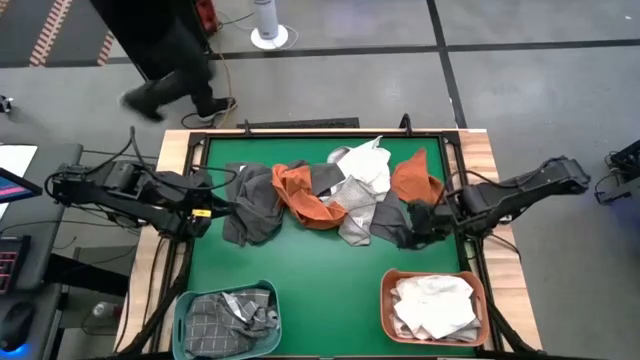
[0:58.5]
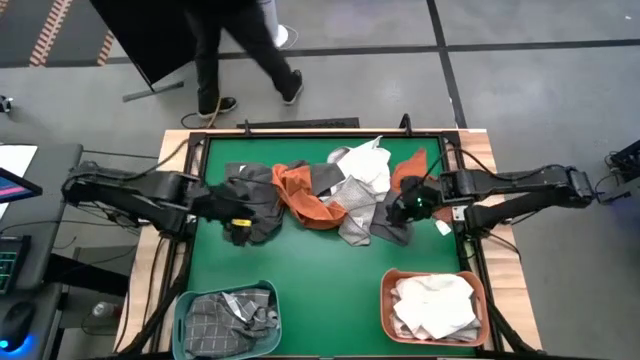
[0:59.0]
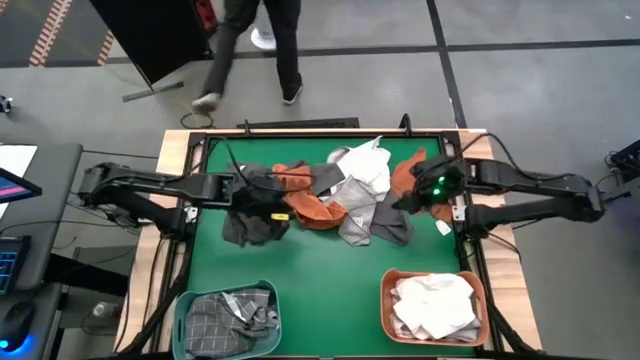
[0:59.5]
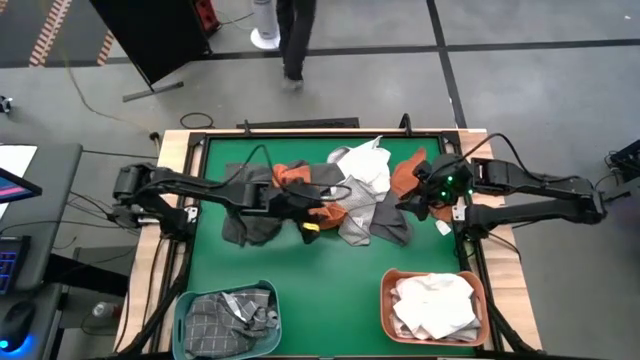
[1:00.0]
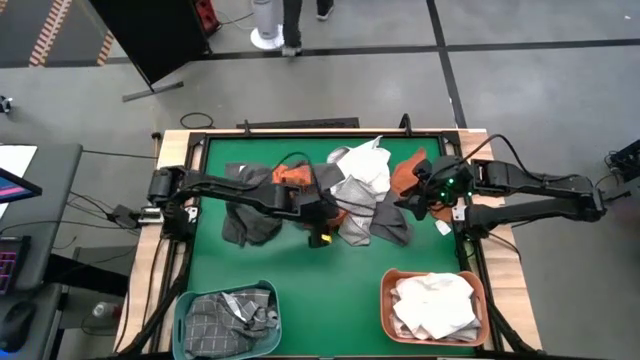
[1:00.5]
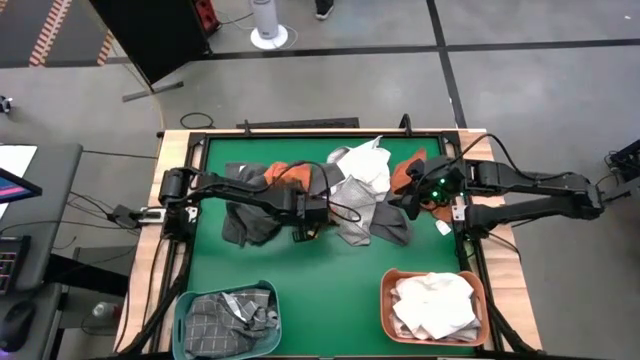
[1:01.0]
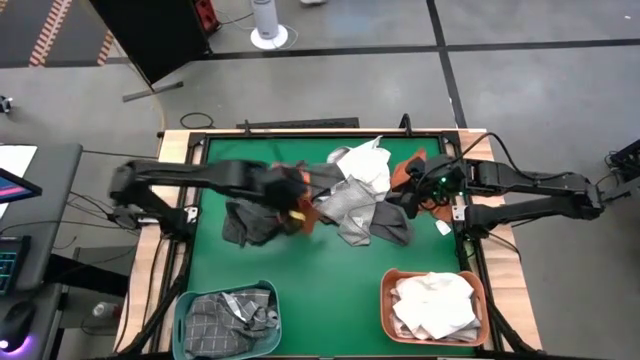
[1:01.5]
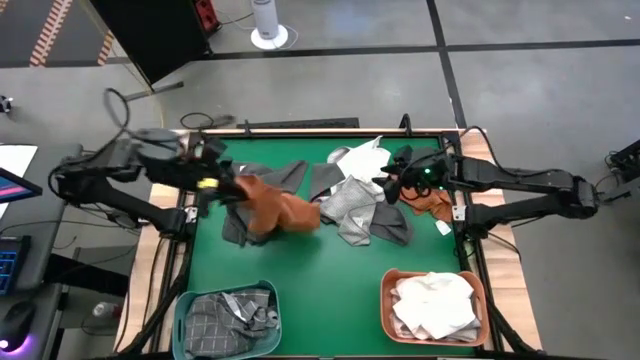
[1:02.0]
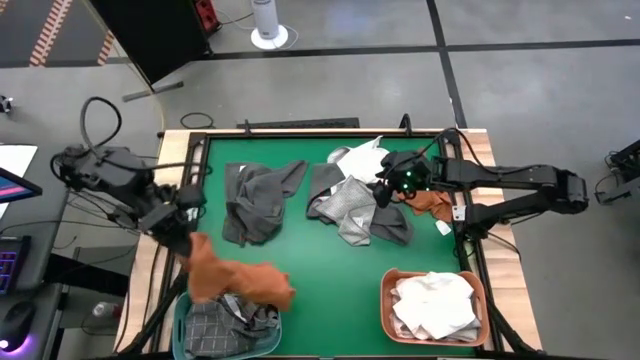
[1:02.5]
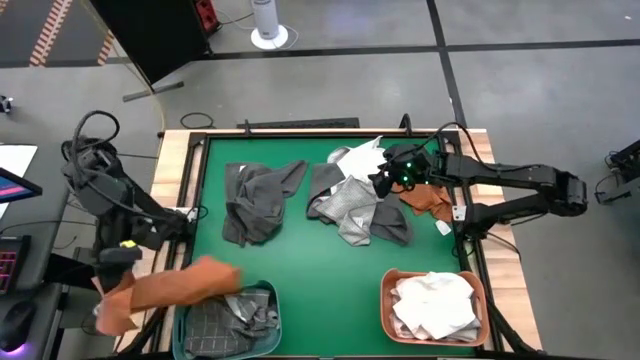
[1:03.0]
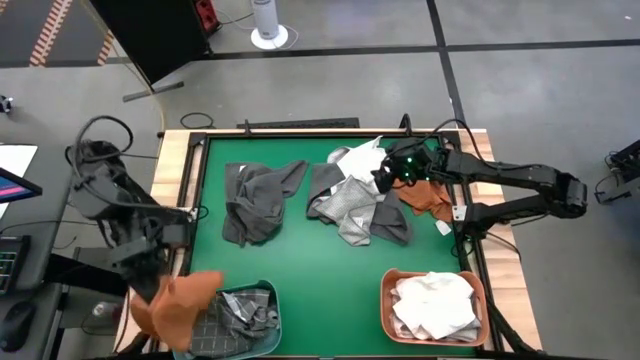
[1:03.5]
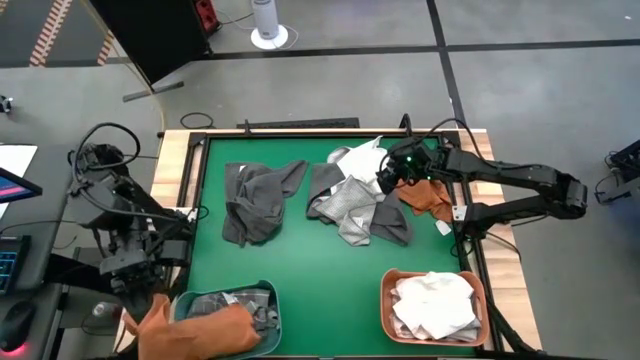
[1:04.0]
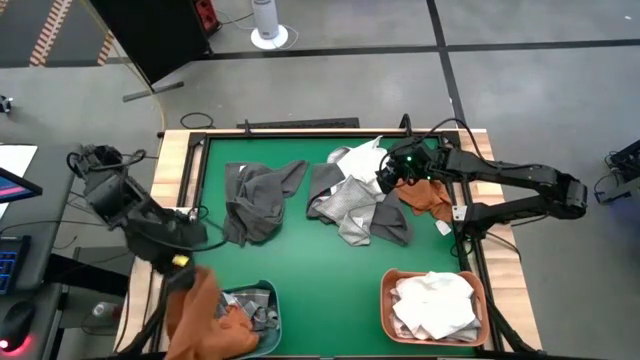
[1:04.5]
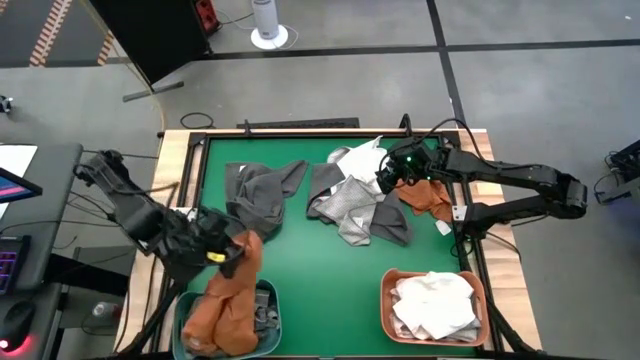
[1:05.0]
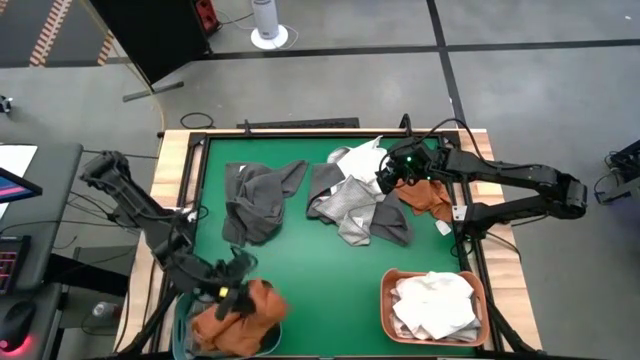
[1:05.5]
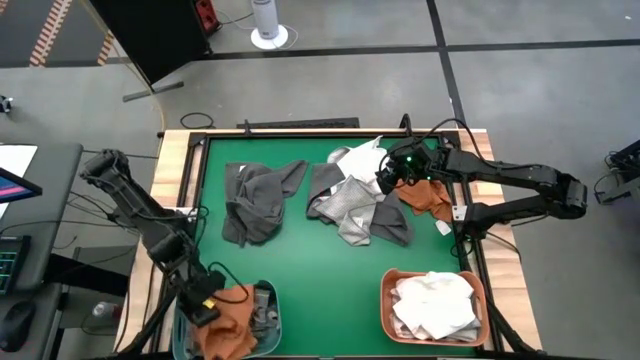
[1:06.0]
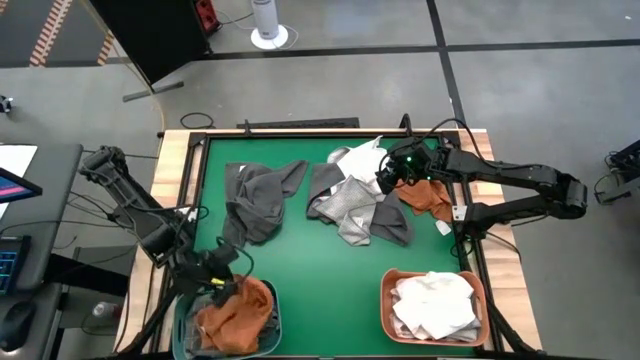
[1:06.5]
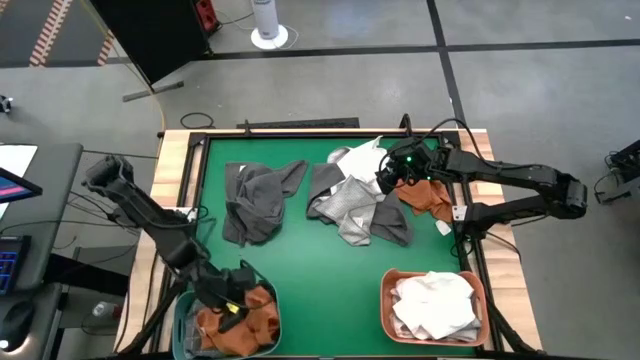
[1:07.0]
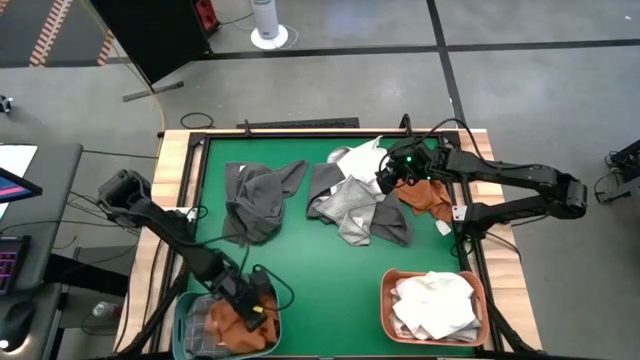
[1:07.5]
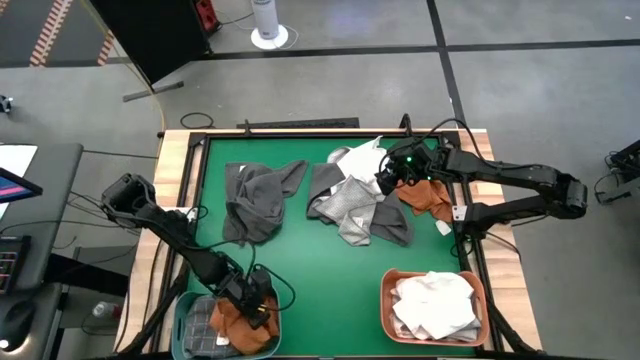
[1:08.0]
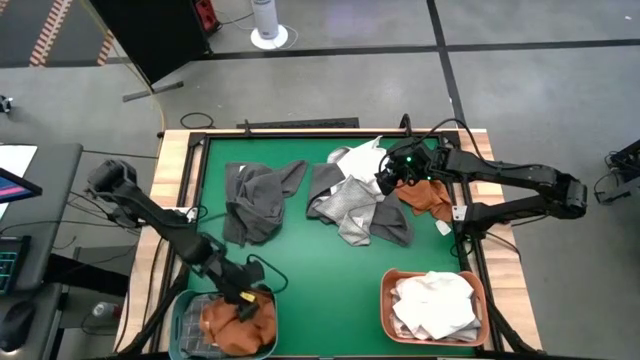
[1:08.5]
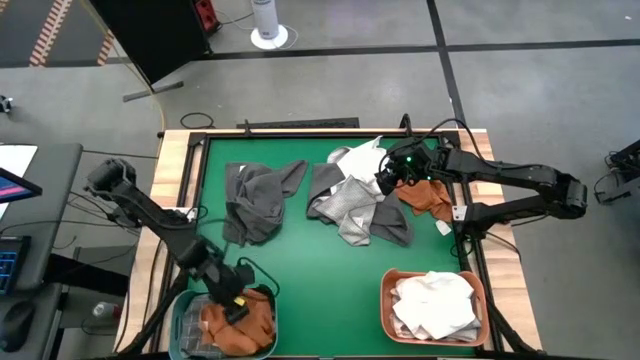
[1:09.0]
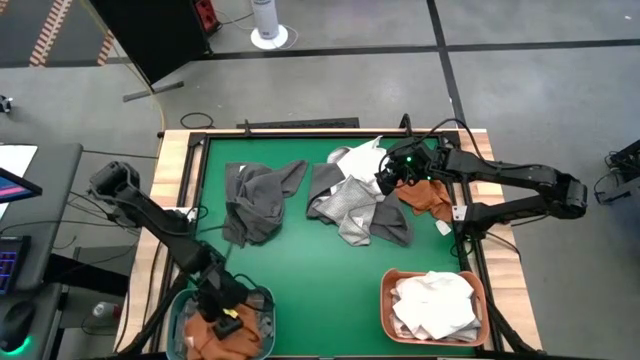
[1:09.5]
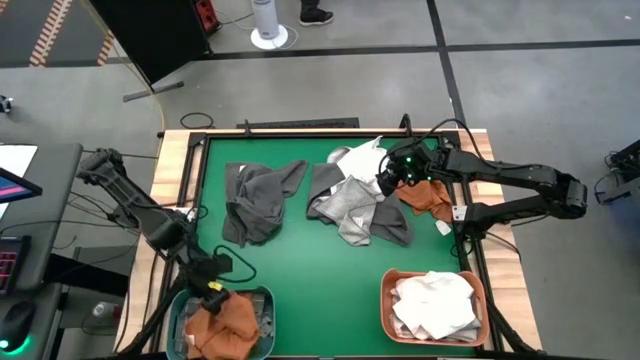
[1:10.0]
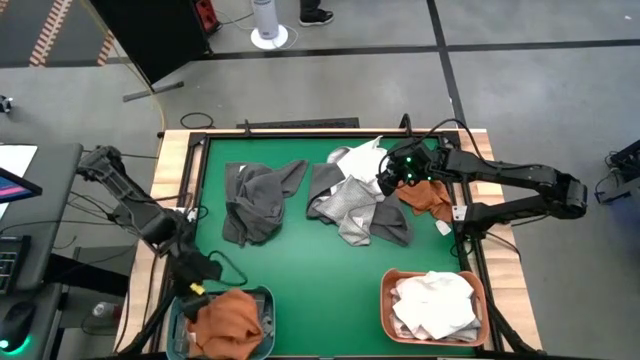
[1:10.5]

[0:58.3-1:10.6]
Task: Sort towels by color in basket
Put the left orange towel into the green bin
